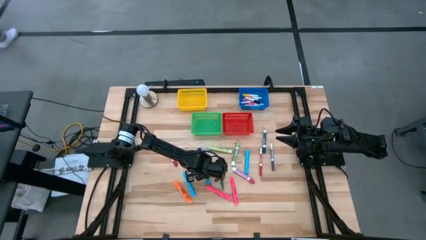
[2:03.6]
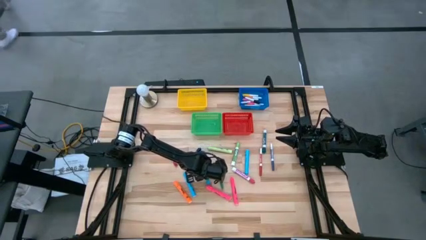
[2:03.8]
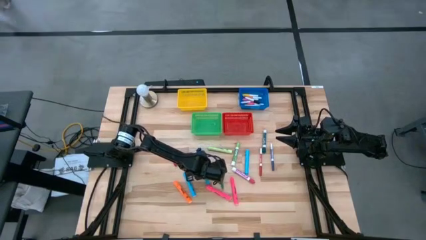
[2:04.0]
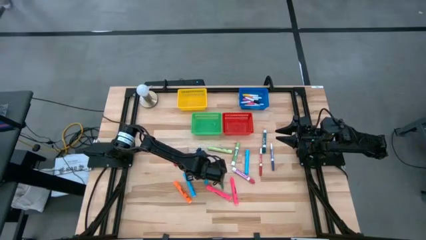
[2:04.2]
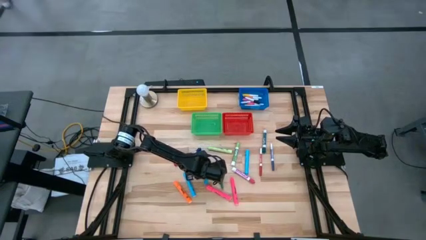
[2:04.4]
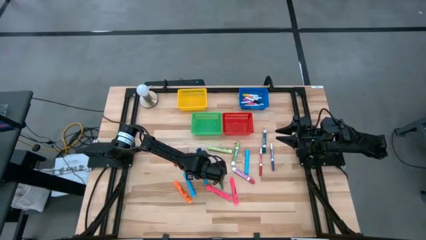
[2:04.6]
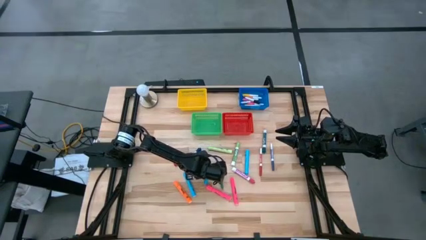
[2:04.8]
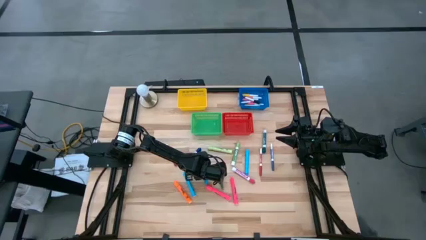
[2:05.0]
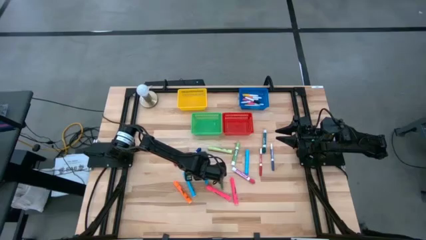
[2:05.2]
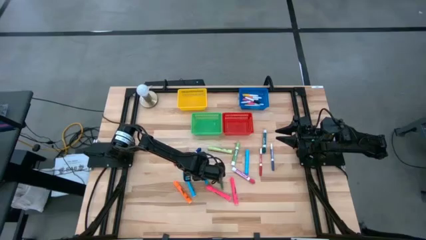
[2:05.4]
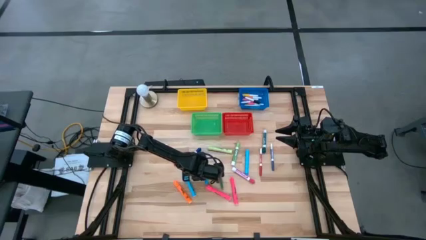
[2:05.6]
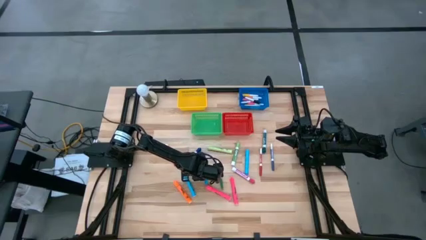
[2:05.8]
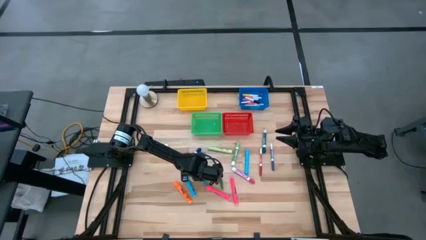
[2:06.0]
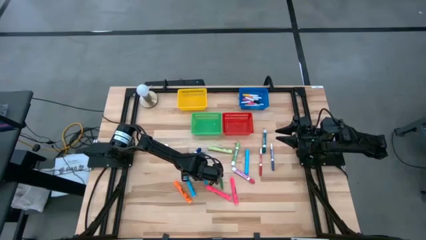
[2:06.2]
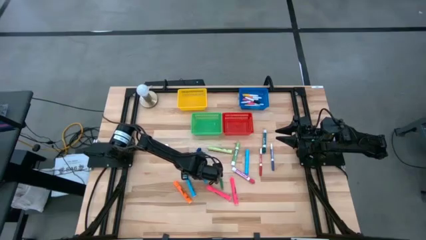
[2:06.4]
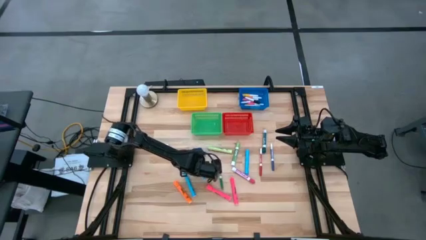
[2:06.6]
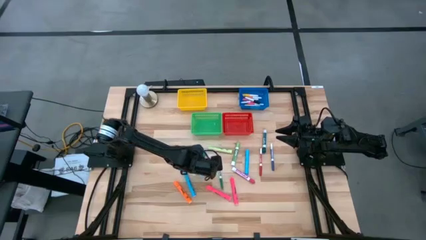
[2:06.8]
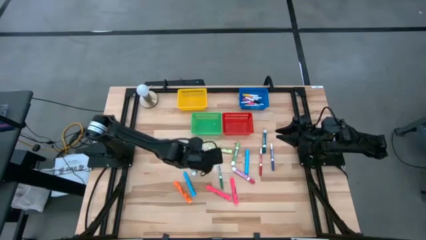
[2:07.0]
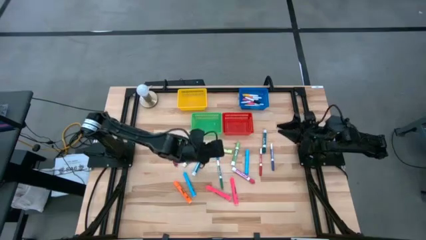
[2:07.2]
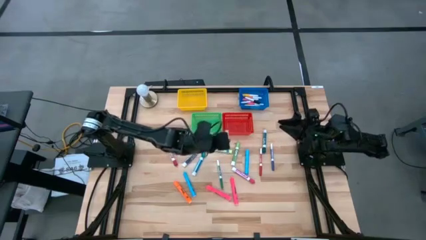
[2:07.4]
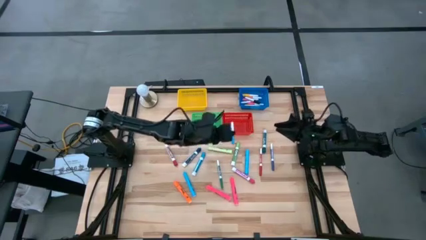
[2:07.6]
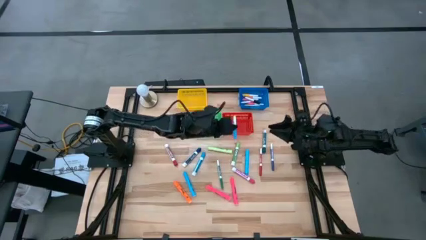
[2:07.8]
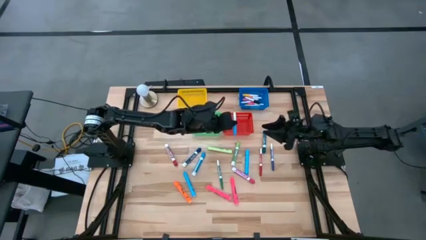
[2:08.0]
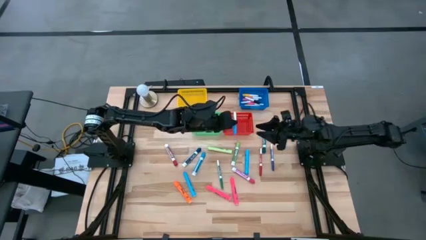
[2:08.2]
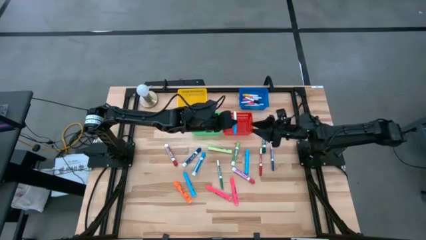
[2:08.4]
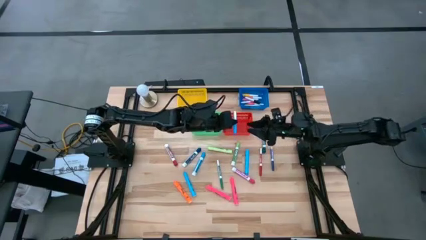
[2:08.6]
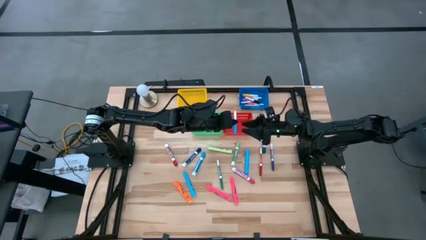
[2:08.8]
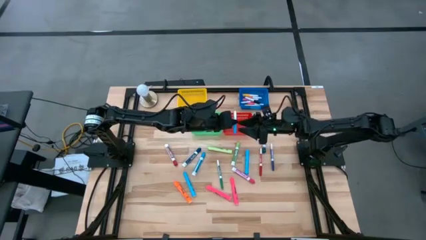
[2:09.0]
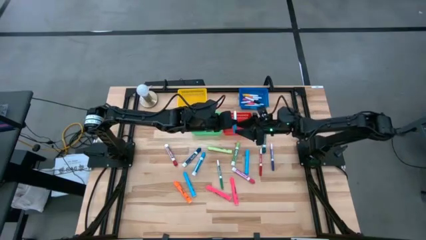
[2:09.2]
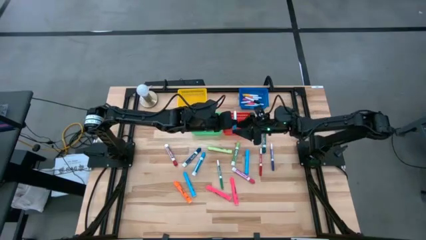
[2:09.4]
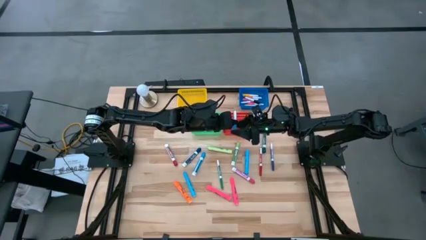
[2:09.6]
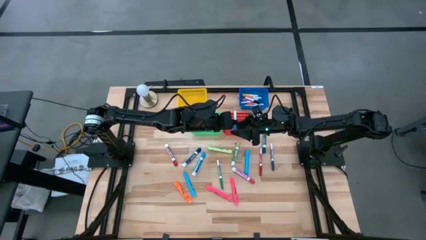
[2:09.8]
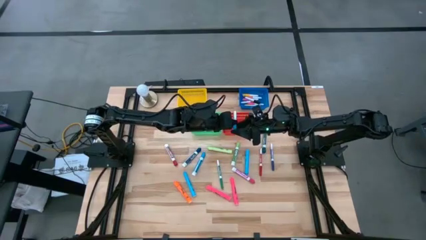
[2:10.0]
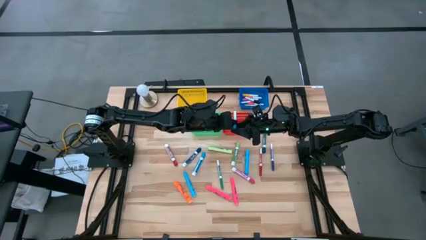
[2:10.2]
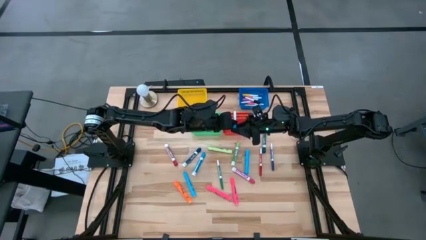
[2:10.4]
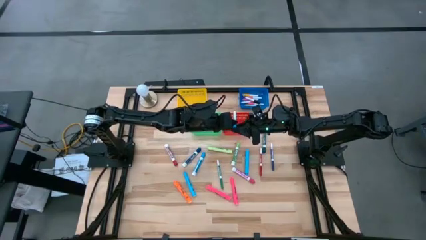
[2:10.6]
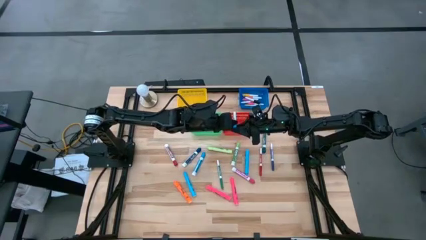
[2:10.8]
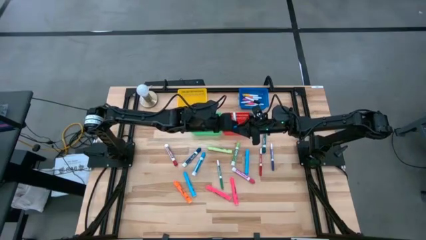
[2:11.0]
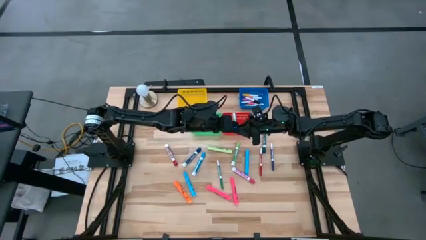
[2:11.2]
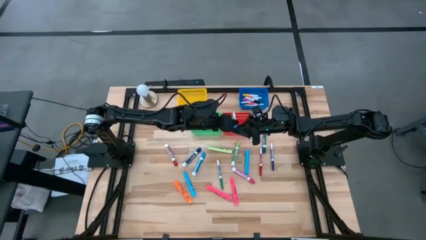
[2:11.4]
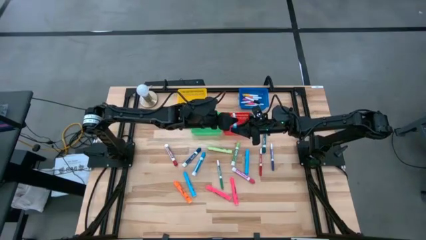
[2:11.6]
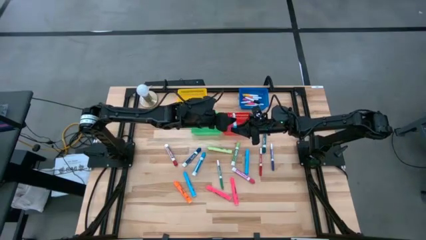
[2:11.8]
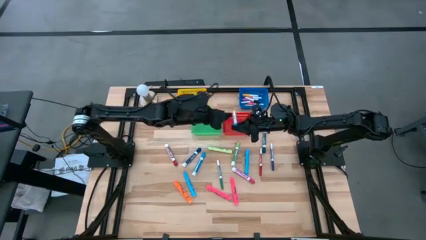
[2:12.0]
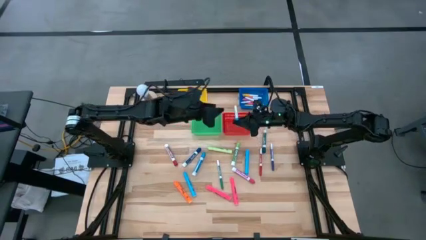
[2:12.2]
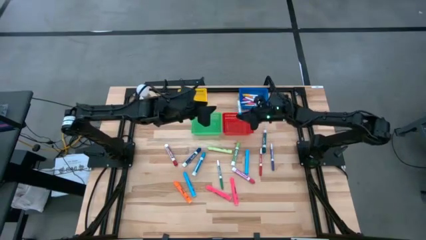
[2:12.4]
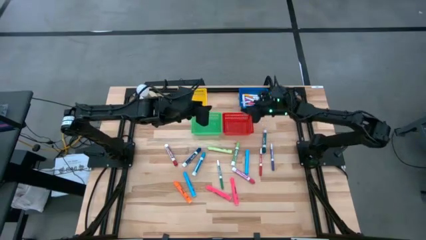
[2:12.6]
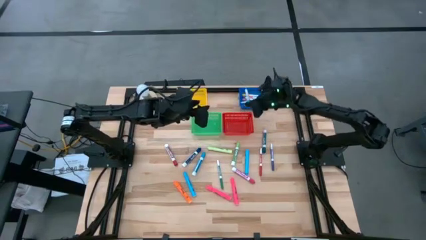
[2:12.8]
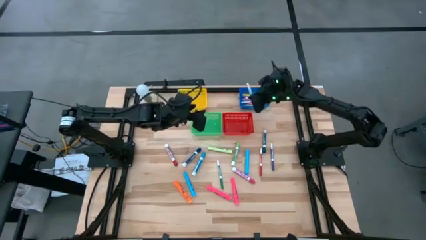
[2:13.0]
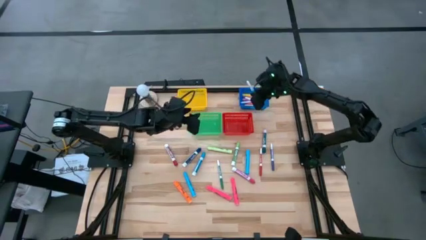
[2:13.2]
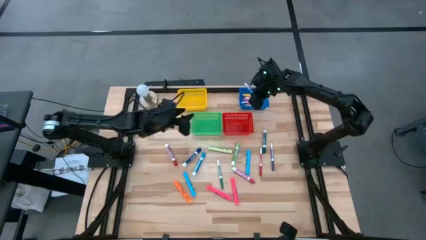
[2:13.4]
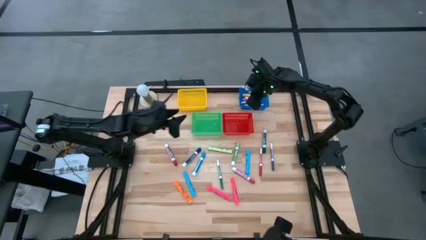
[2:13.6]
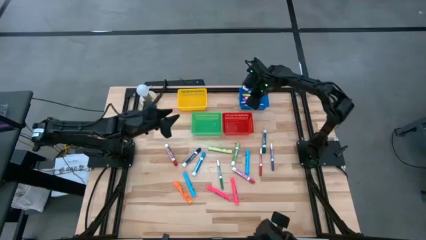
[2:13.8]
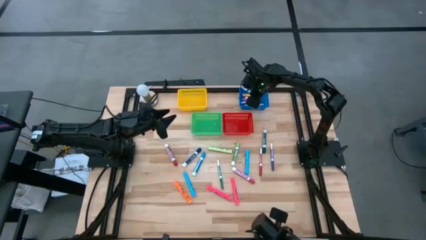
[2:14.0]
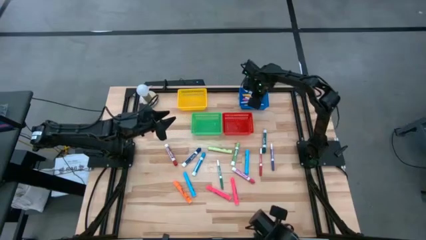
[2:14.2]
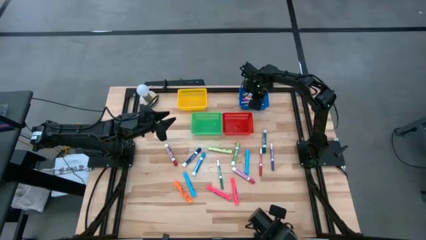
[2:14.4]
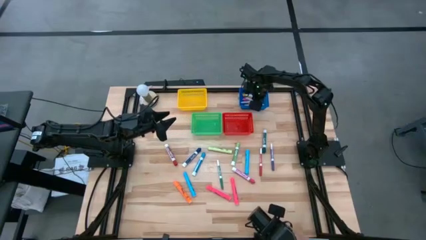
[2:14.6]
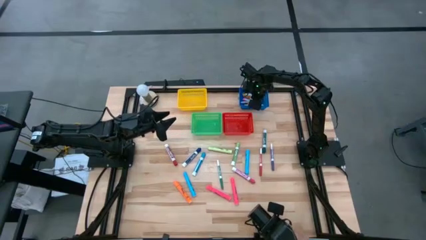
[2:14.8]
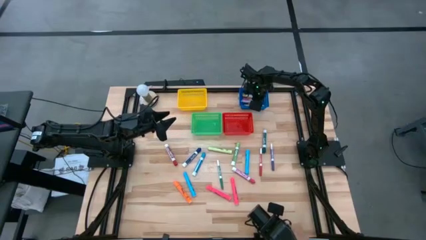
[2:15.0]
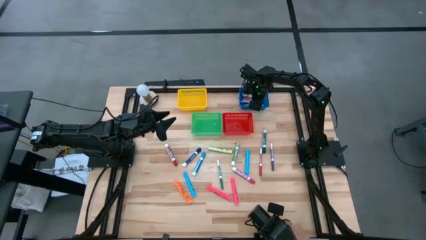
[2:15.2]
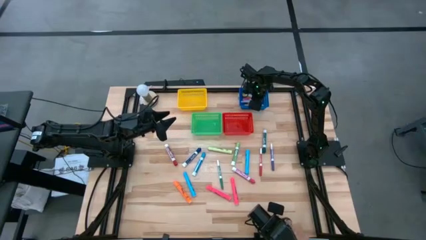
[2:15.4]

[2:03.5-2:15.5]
Task: Pick & Place Markers
Put the blue highlighter into the blue bin

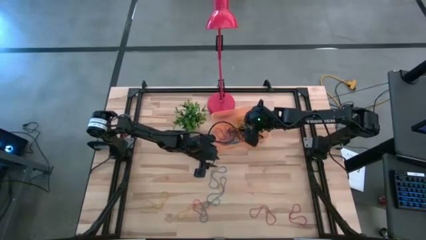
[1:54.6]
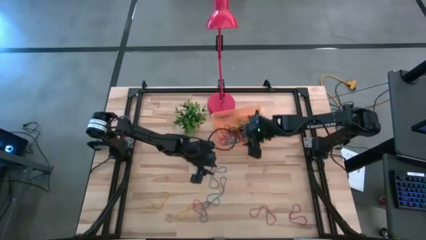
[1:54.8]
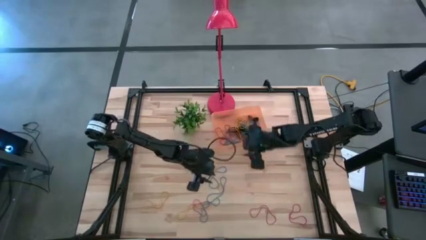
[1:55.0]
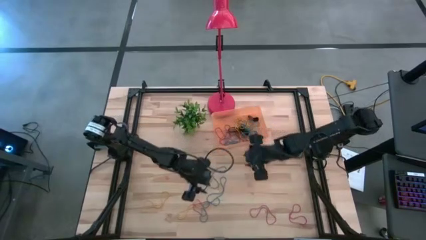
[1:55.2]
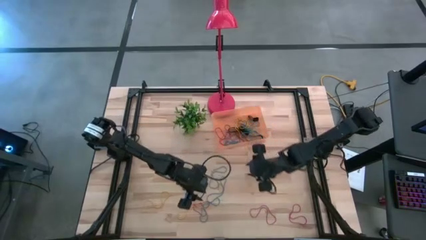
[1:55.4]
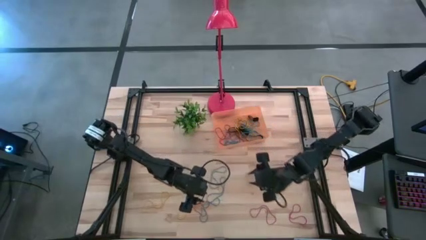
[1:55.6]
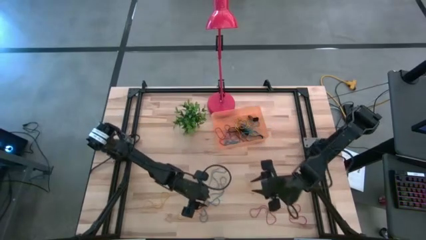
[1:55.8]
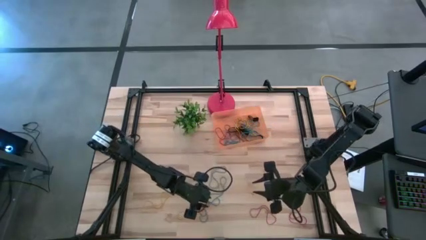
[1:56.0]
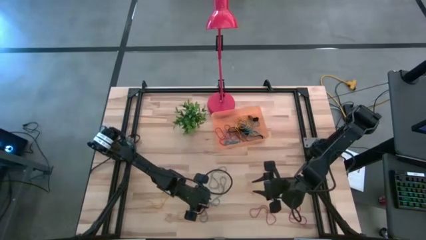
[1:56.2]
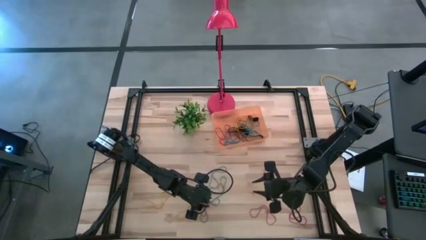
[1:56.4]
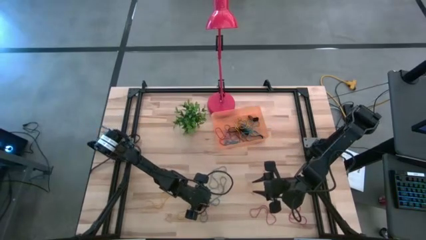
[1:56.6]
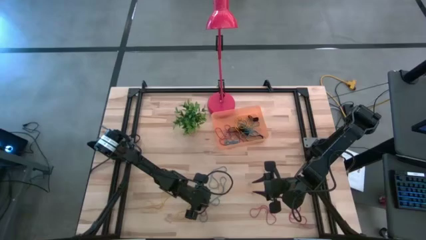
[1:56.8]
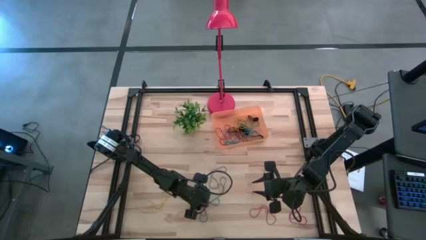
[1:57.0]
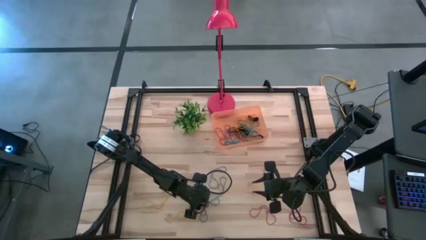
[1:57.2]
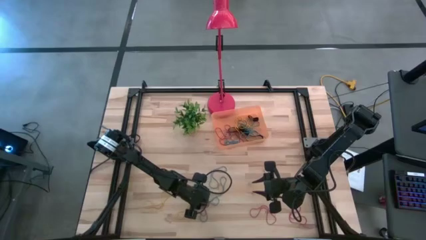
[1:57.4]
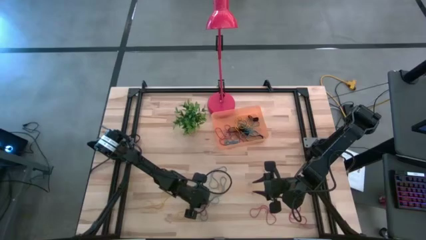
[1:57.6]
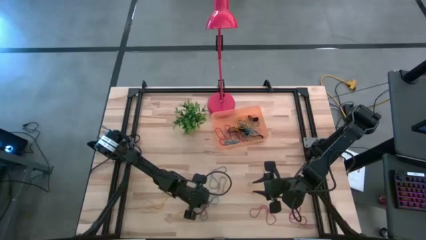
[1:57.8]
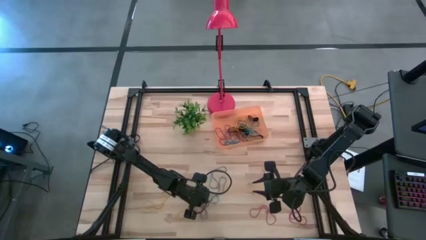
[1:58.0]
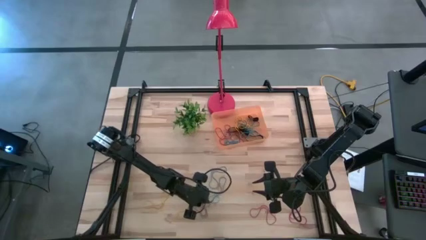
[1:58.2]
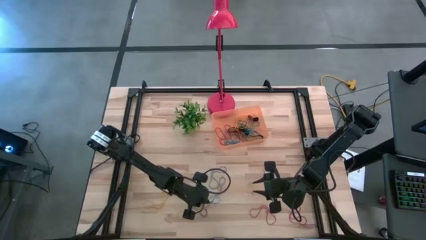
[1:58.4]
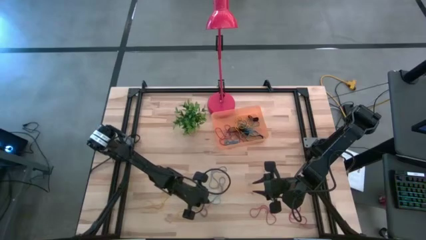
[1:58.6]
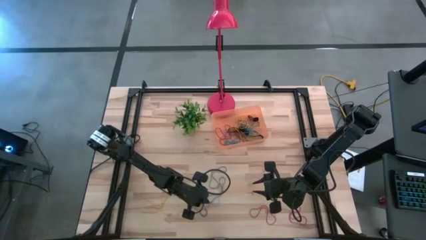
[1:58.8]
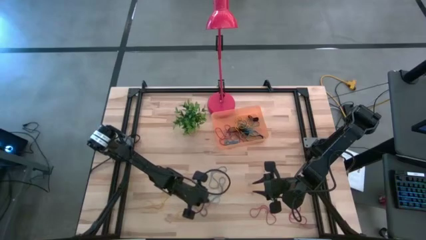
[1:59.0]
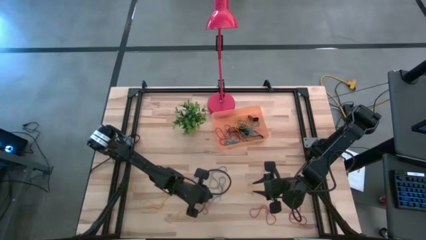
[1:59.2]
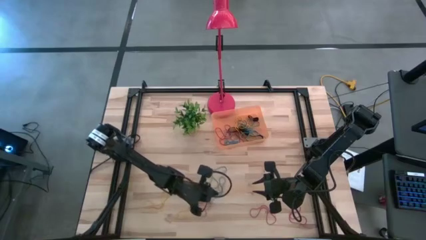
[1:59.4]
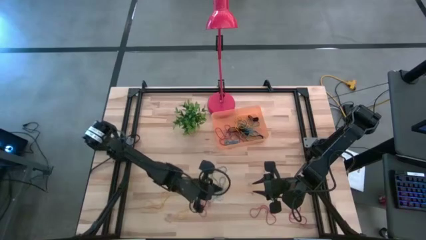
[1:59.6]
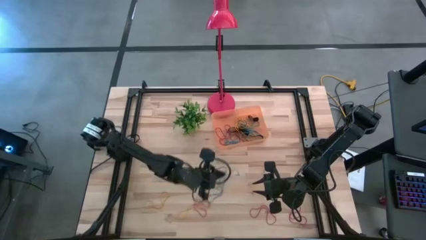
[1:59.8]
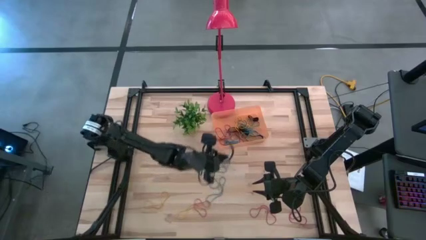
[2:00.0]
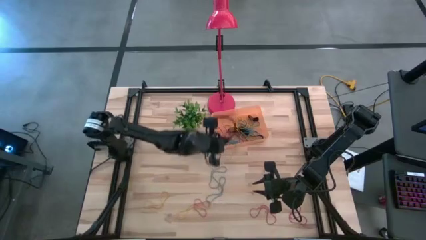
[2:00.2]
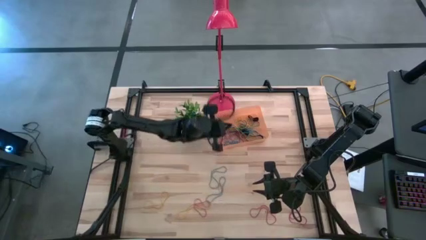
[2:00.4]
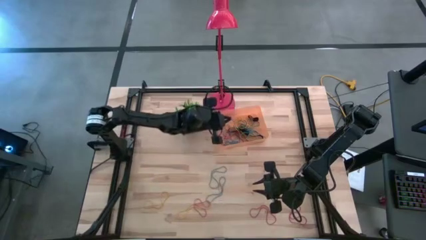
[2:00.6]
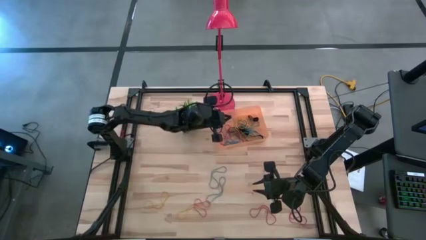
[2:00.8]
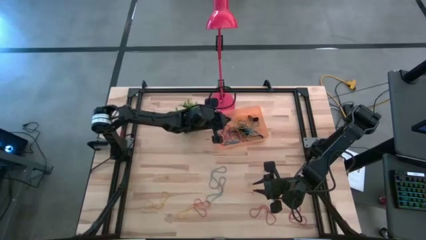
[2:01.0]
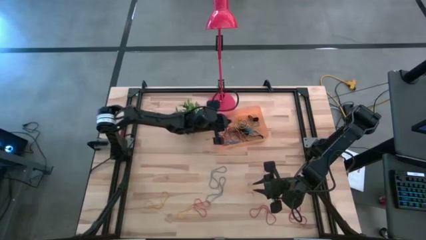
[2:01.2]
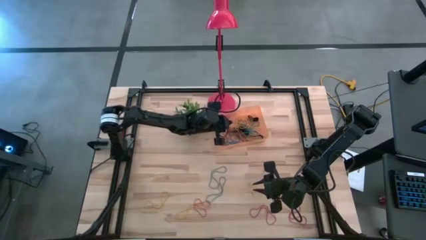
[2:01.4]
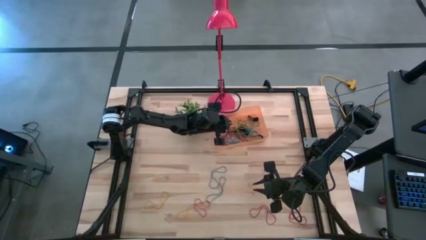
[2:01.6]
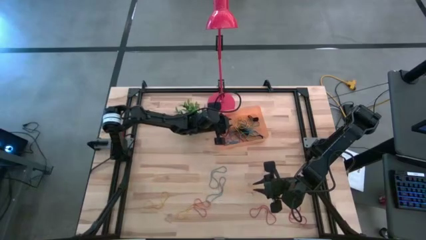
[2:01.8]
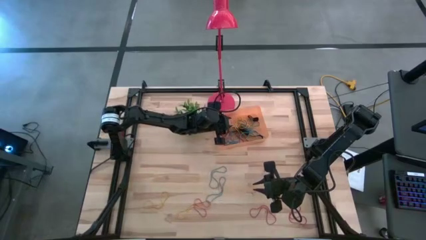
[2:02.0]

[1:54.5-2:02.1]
Task: Pick and place rubber bands into bin
Put the blue rubberband into the orange container
